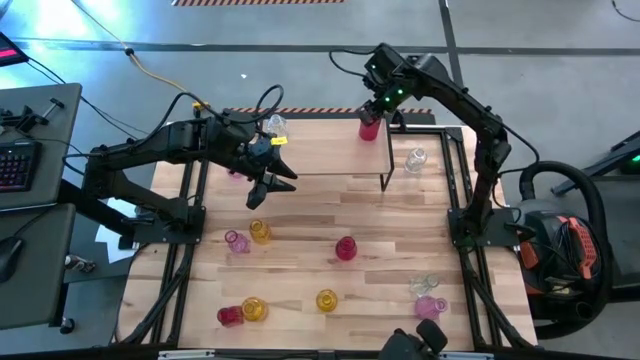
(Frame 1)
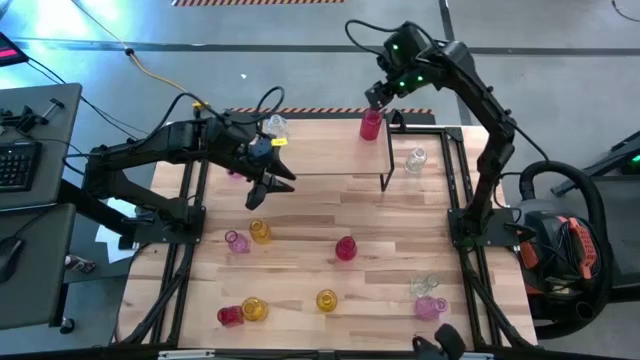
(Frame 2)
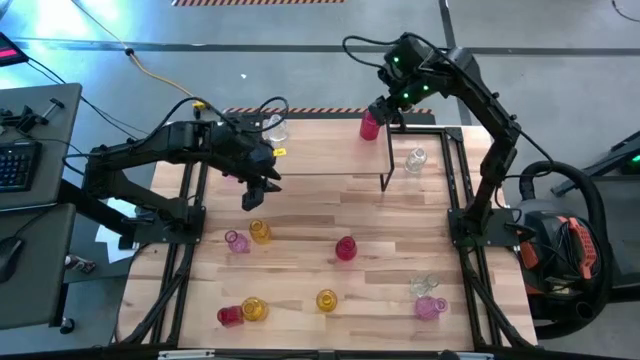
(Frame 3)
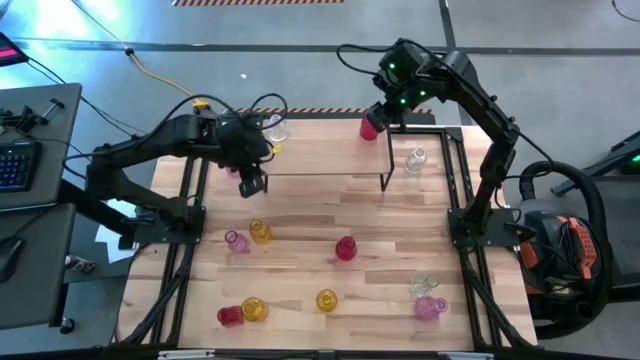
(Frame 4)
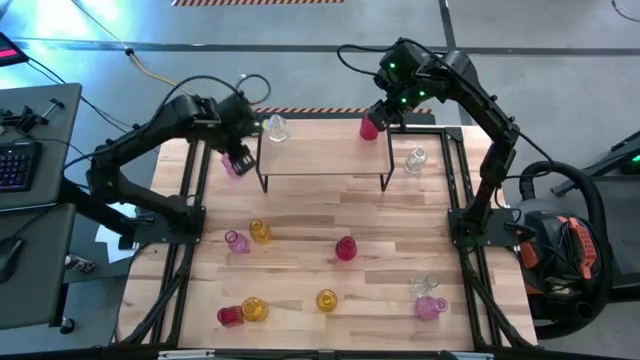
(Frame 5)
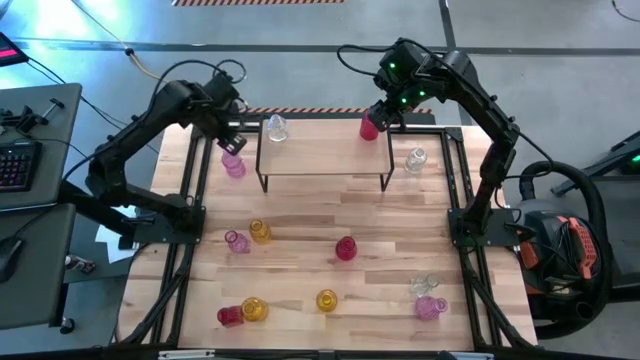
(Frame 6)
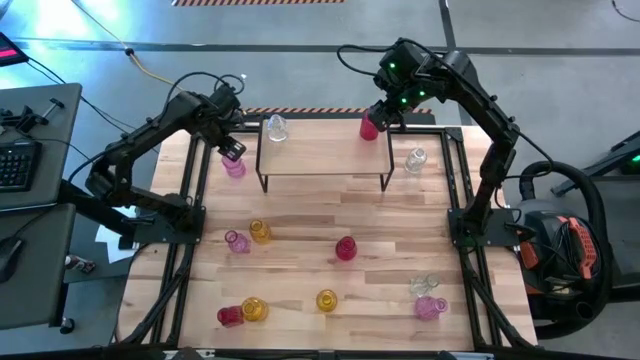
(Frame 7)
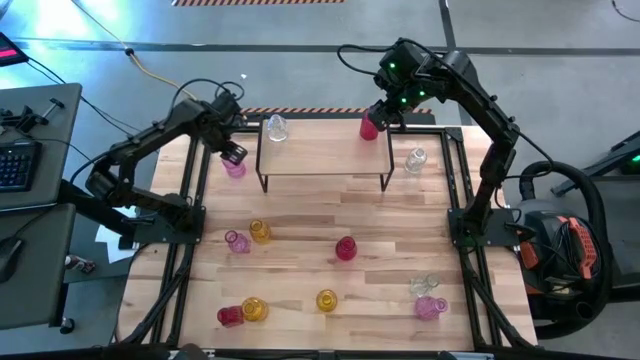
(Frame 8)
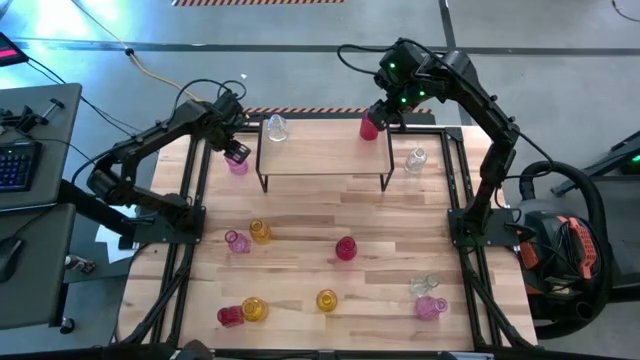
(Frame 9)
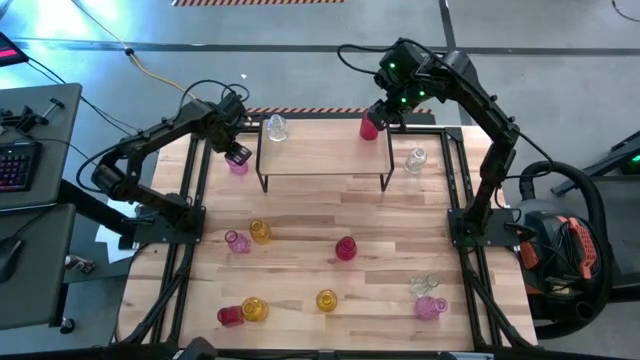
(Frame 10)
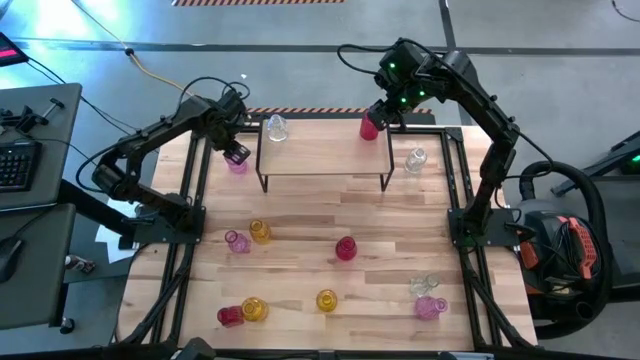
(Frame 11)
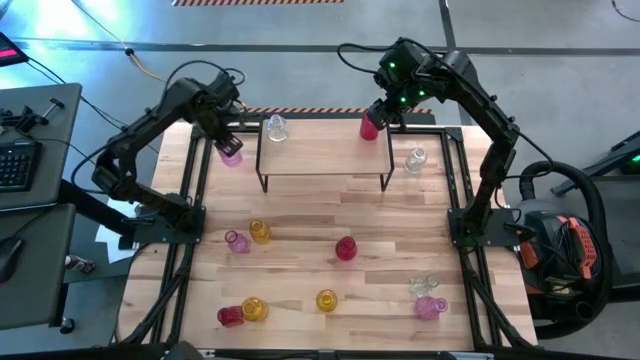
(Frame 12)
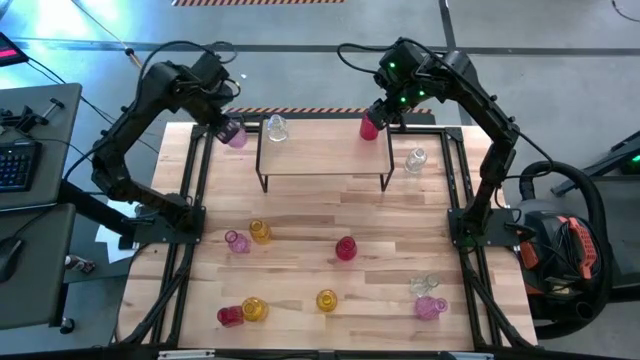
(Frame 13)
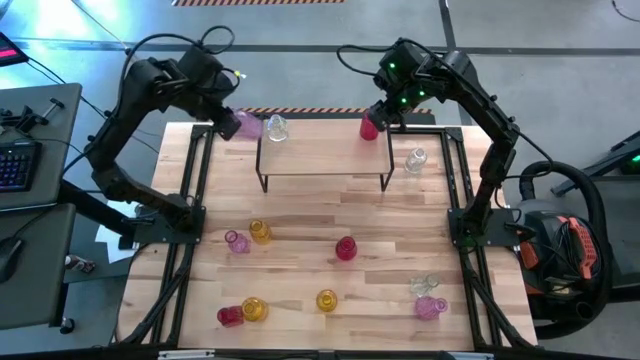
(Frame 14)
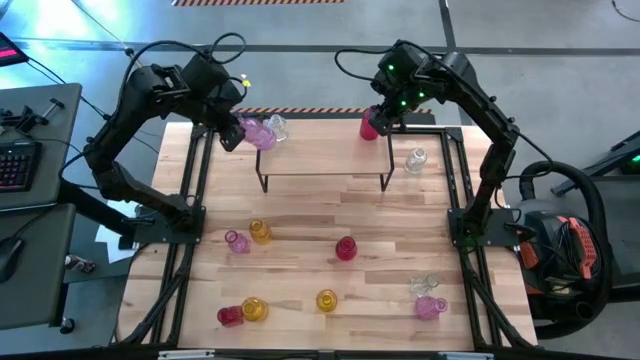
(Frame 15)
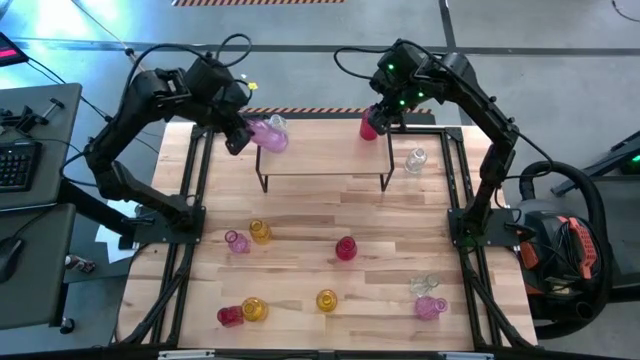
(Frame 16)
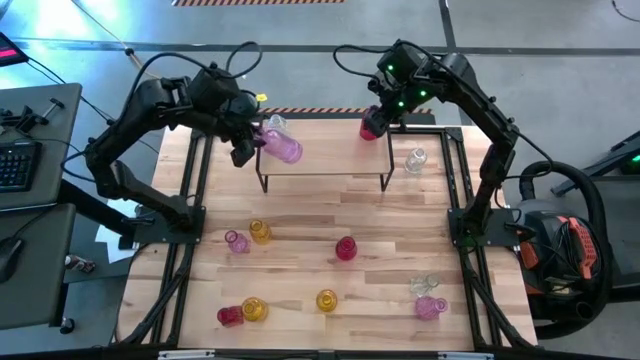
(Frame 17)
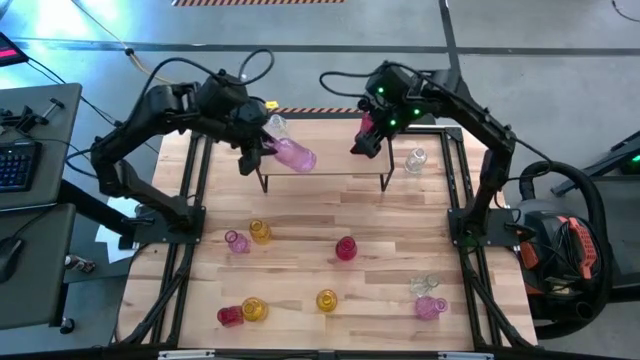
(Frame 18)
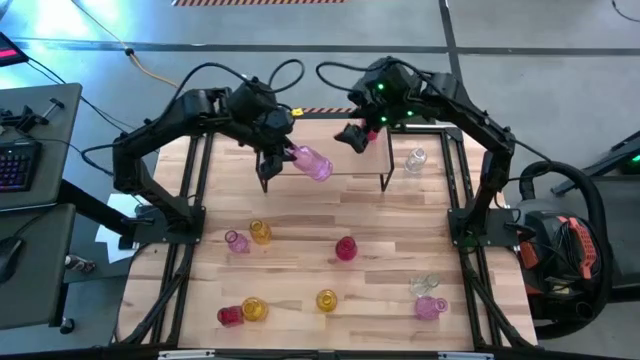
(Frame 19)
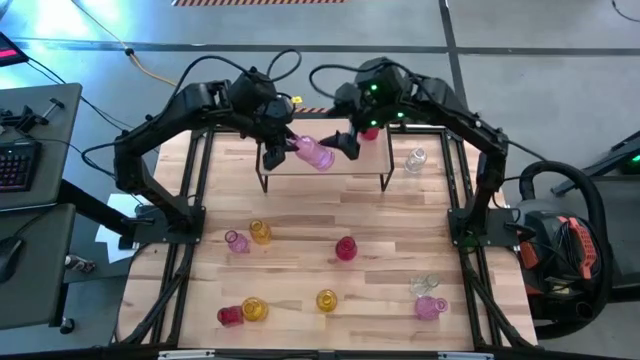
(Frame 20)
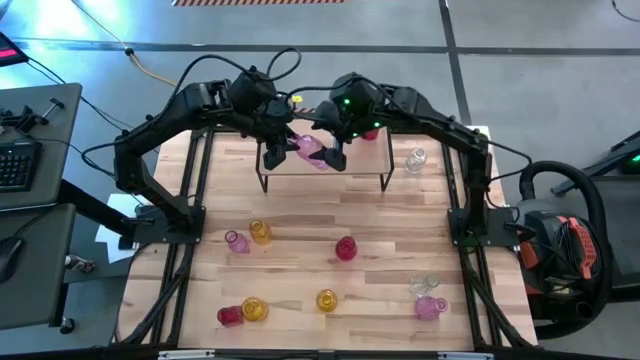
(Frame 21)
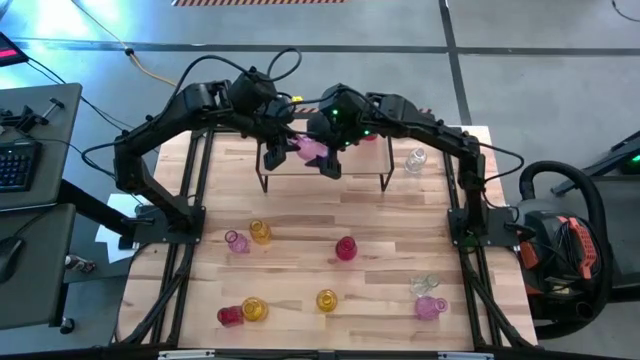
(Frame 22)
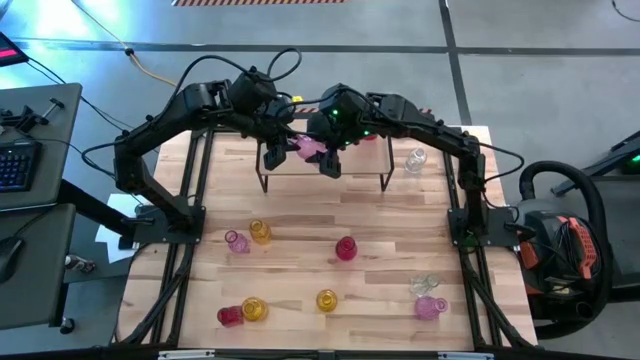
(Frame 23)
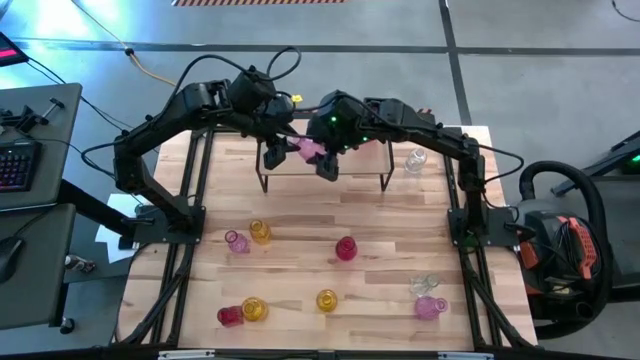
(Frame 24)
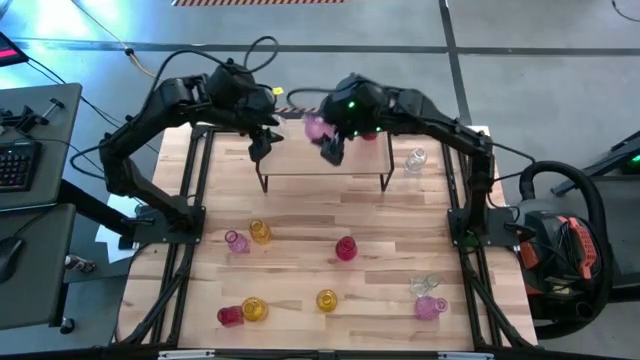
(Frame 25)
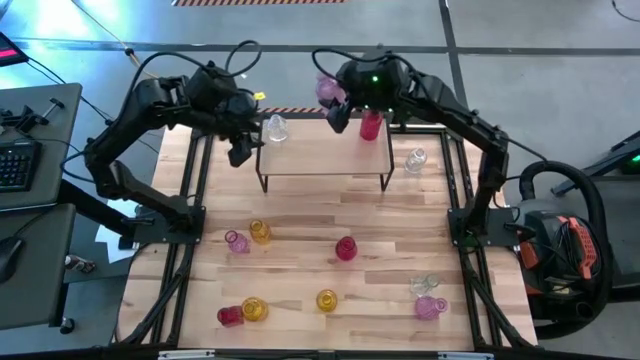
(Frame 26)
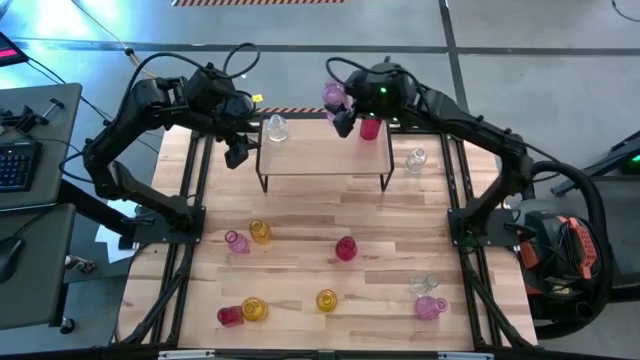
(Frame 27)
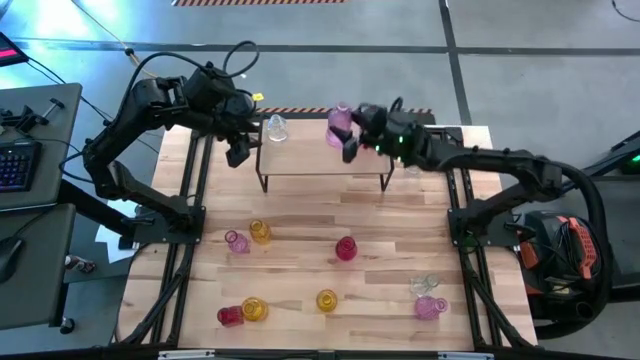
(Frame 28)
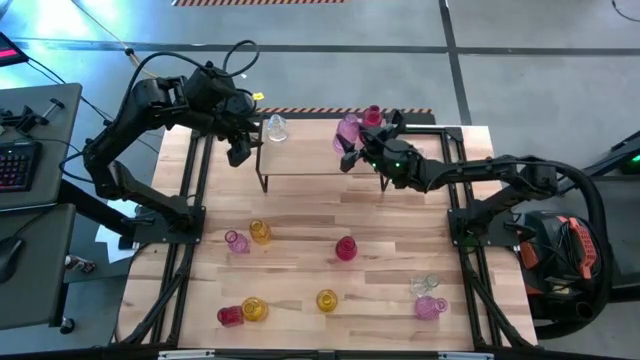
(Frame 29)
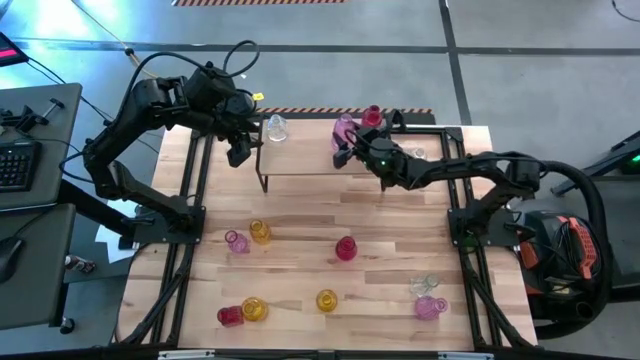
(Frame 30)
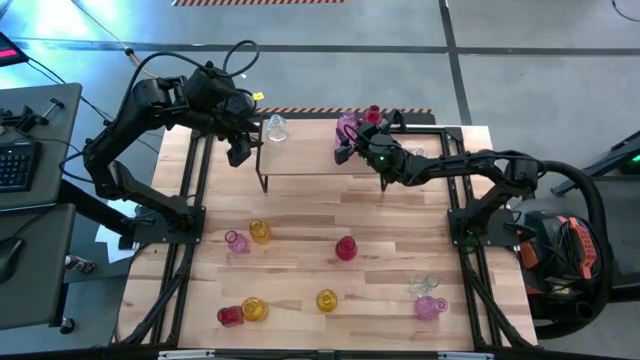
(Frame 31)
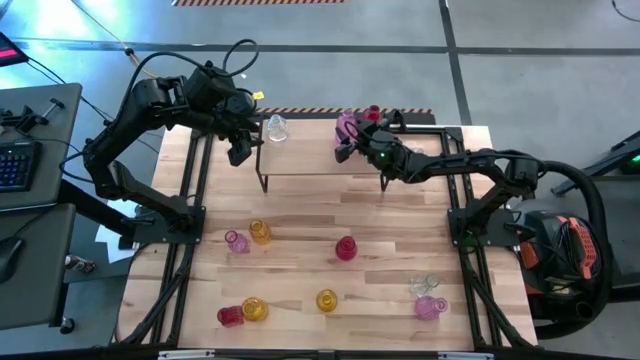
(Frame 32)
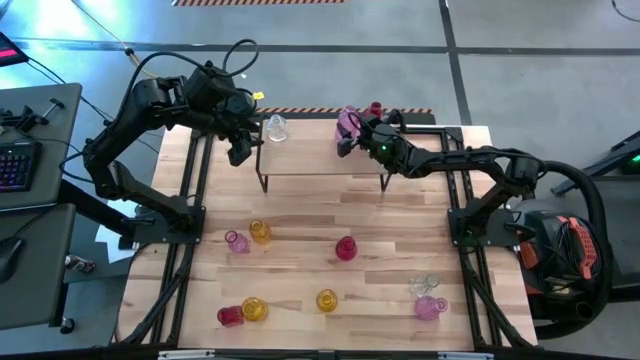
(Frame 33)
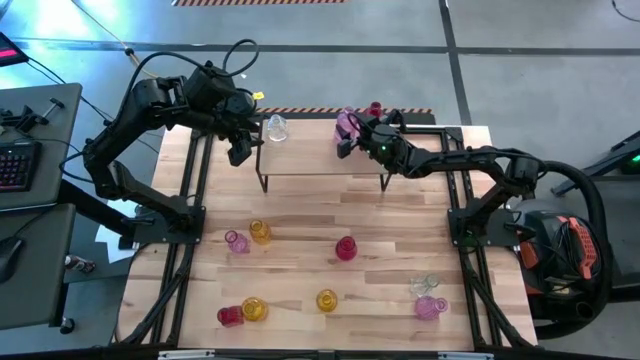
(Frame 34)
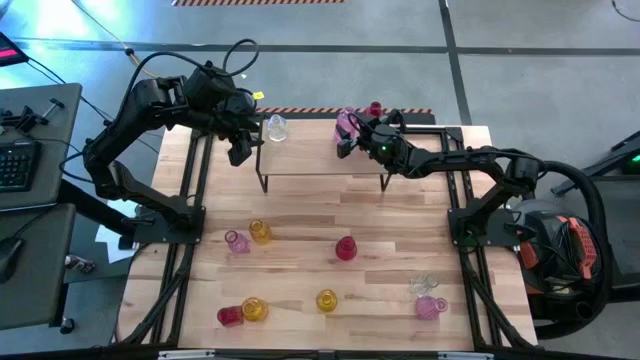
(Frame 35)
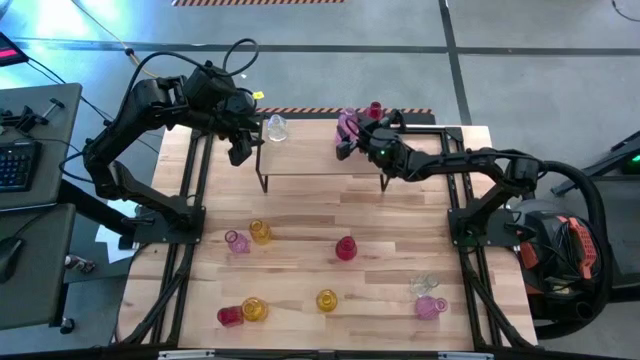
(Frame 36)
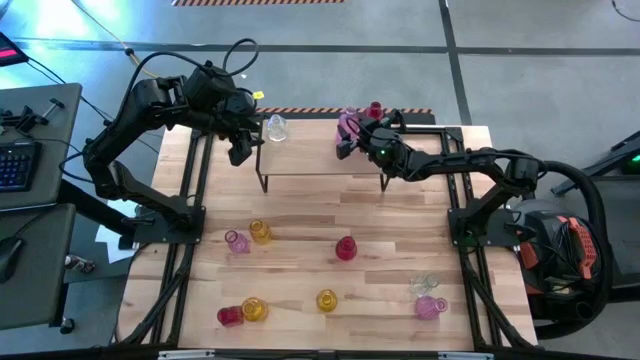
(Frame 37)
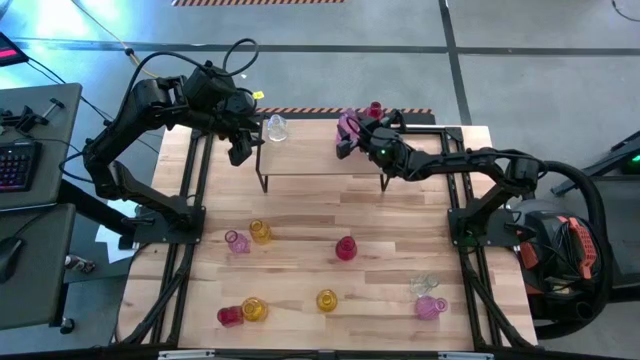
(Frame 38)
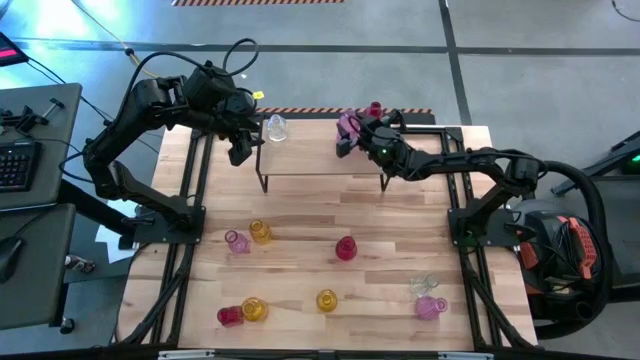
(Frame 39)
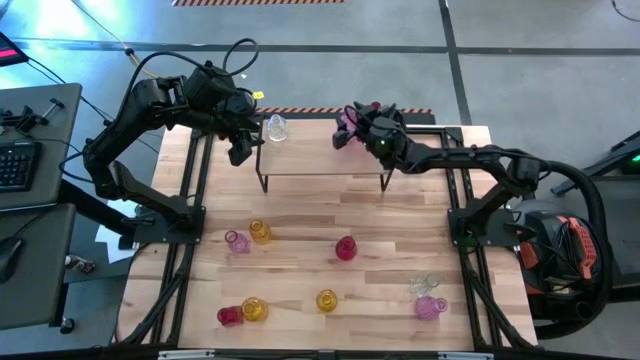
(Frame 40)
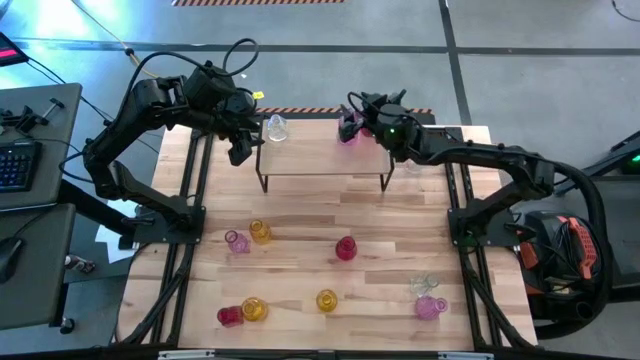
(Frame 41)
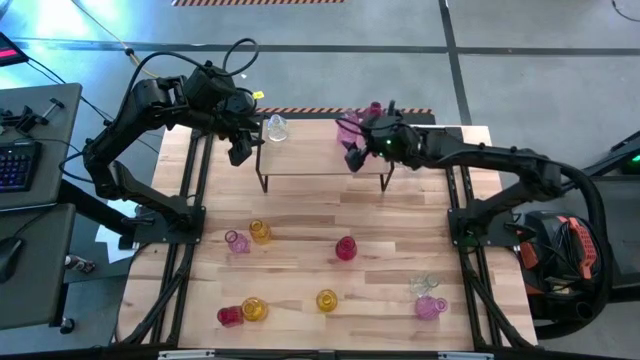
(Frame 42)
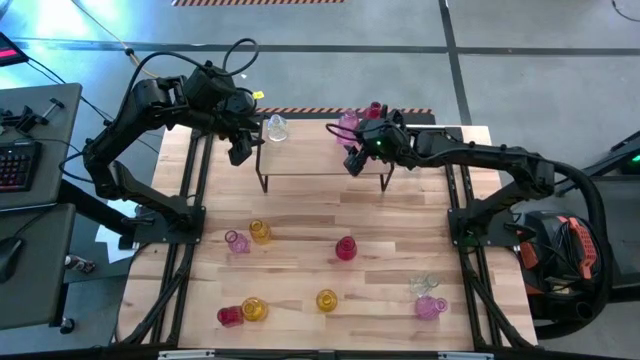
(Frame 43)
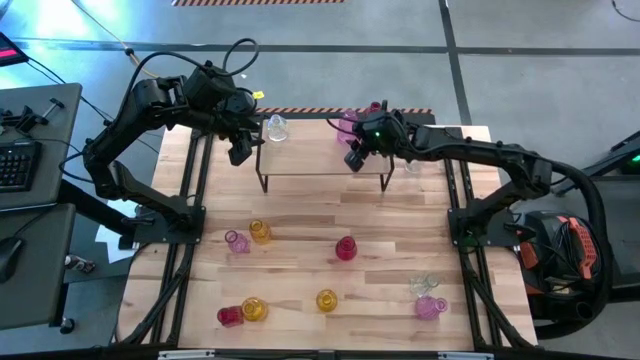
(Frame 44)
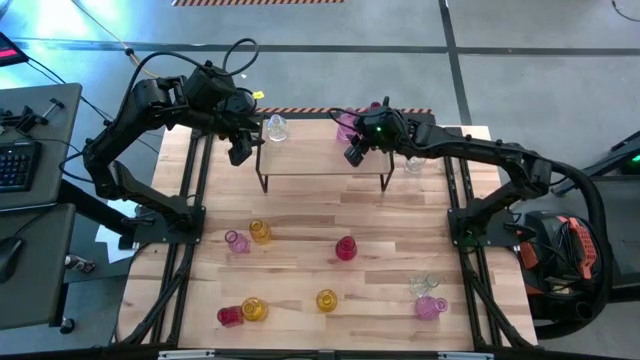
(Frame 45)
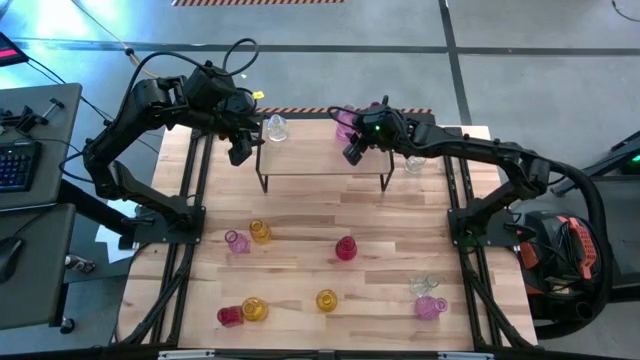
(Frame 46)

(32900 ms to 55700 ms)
Task: sort vases onto shelf
Put the top violet vase on the shelf
